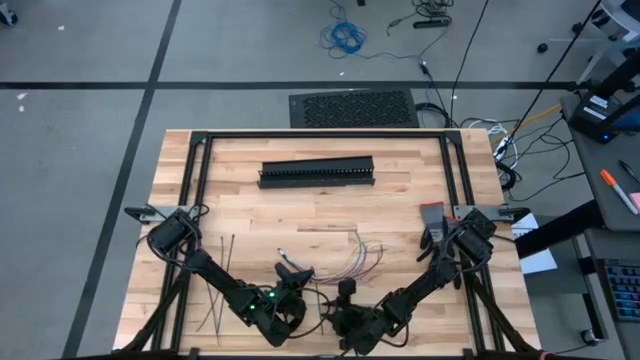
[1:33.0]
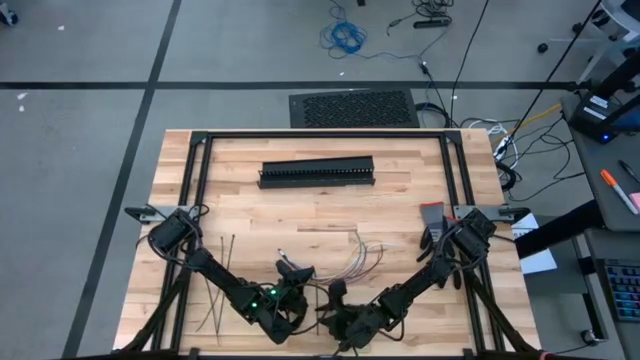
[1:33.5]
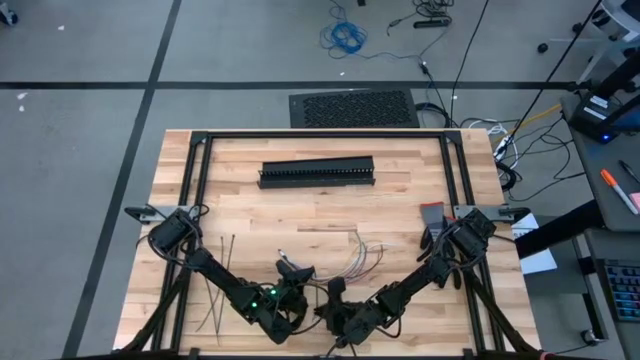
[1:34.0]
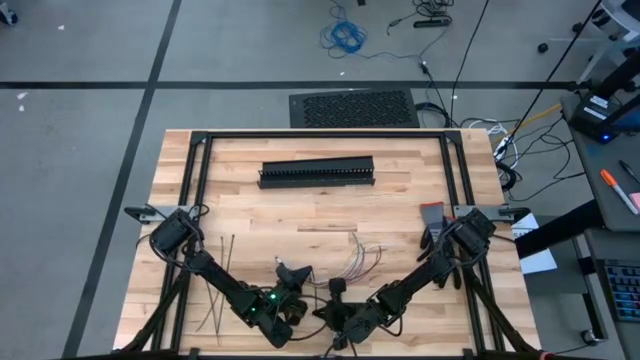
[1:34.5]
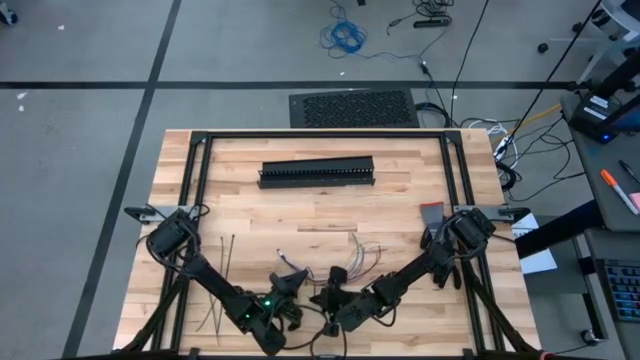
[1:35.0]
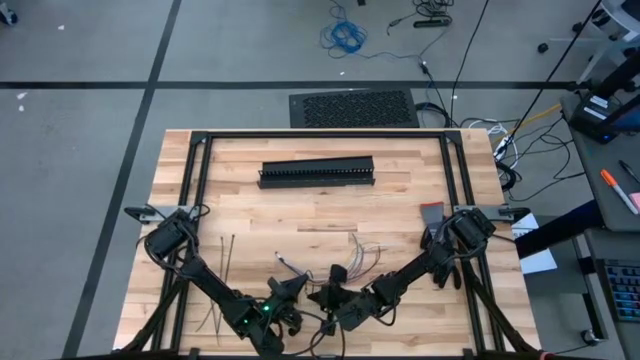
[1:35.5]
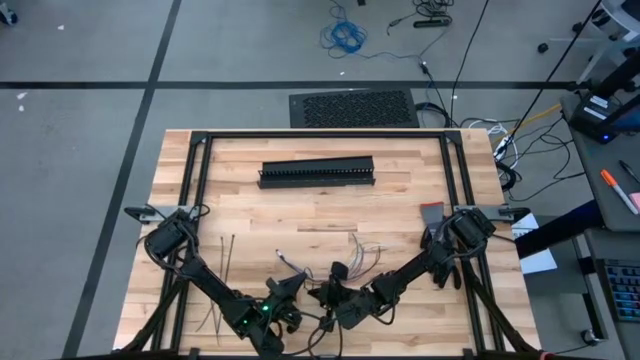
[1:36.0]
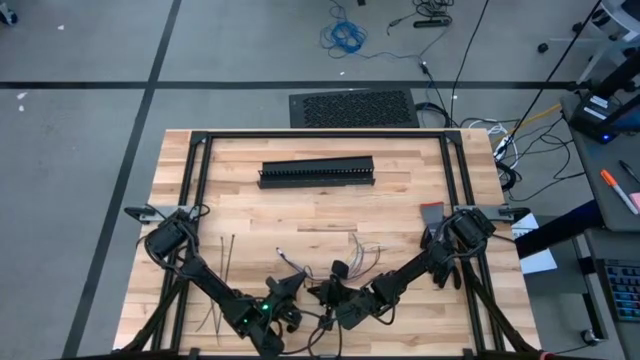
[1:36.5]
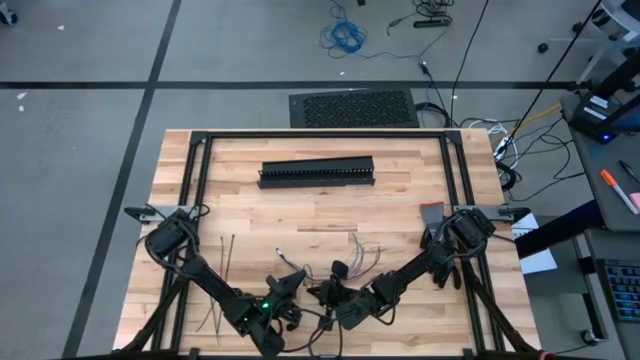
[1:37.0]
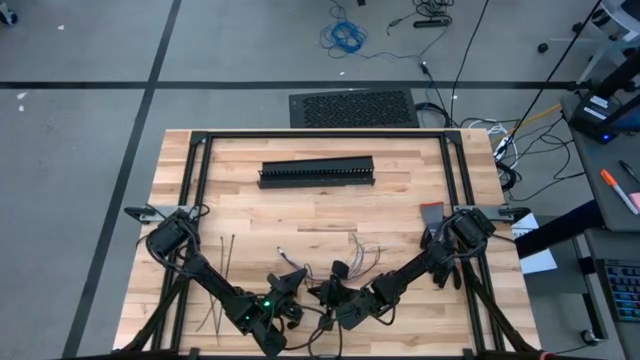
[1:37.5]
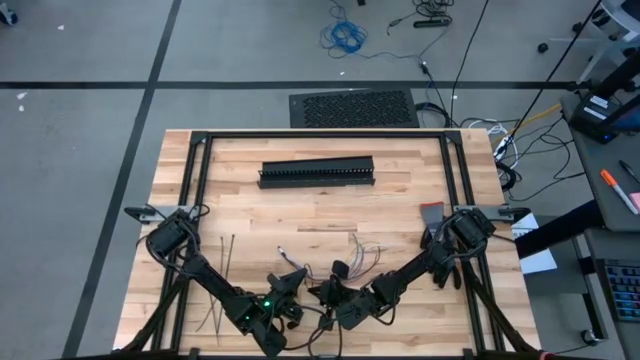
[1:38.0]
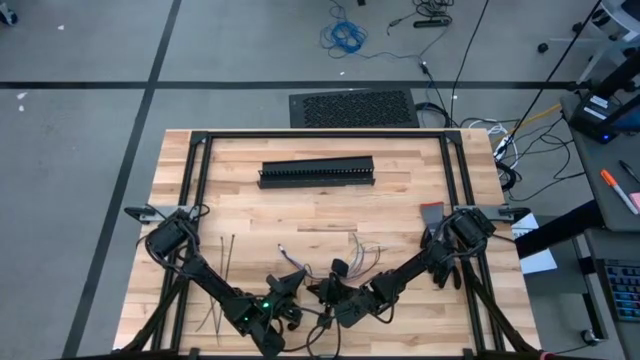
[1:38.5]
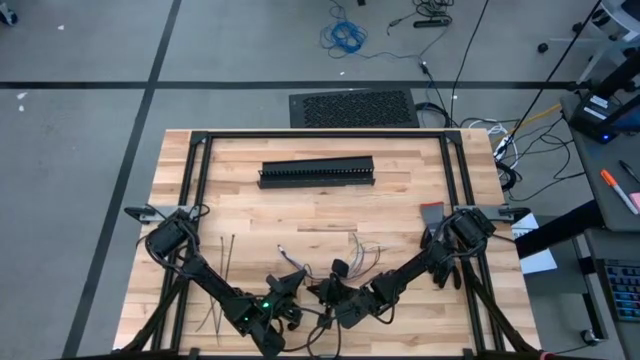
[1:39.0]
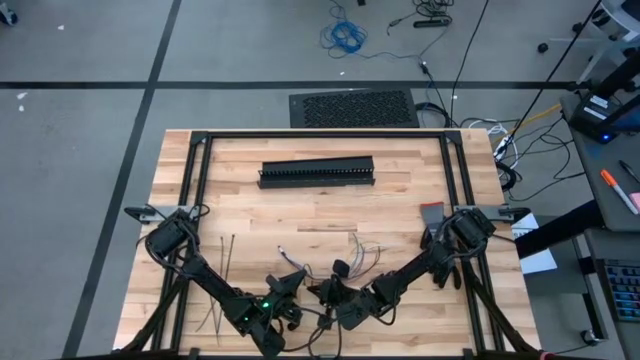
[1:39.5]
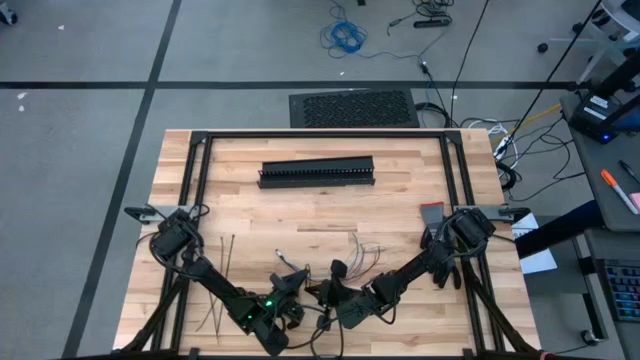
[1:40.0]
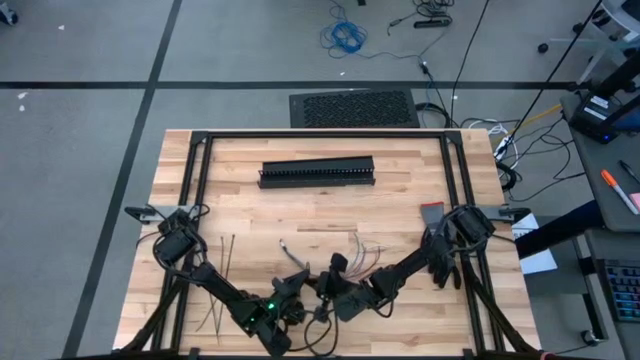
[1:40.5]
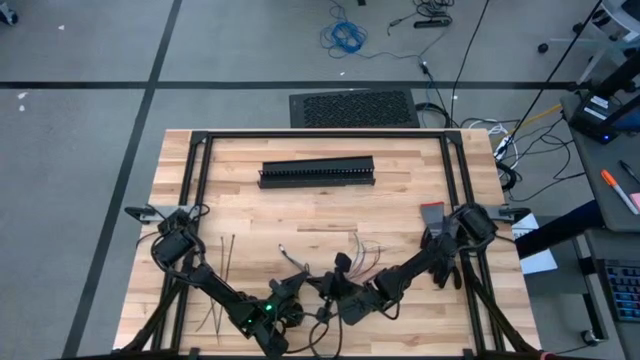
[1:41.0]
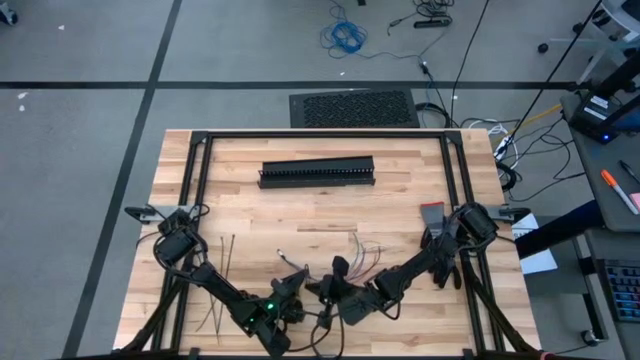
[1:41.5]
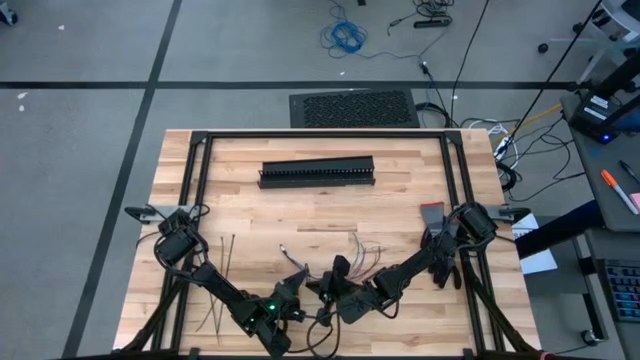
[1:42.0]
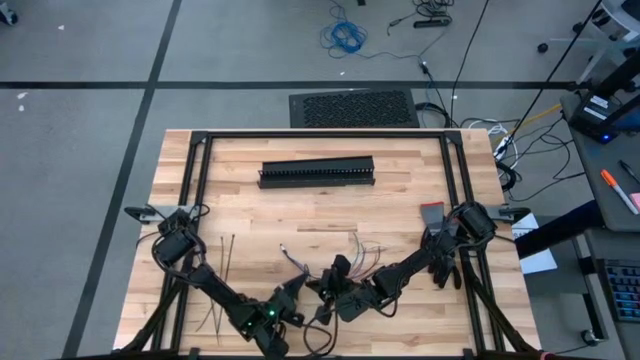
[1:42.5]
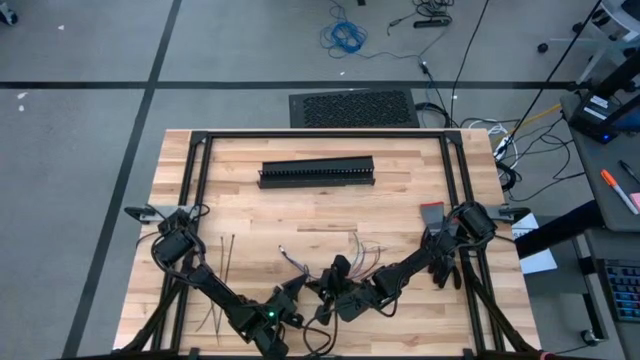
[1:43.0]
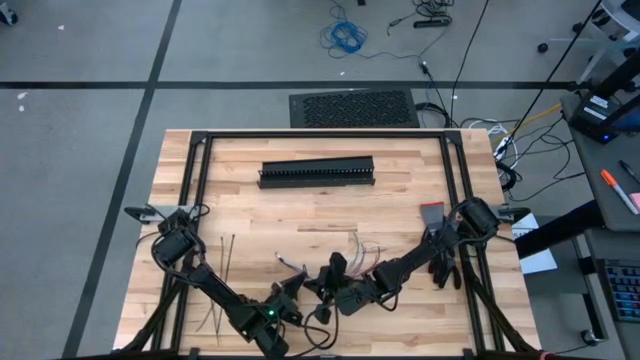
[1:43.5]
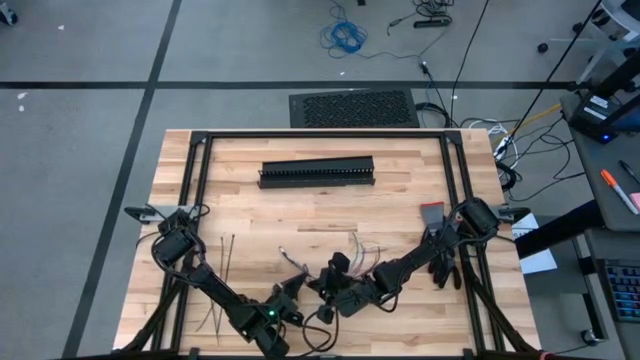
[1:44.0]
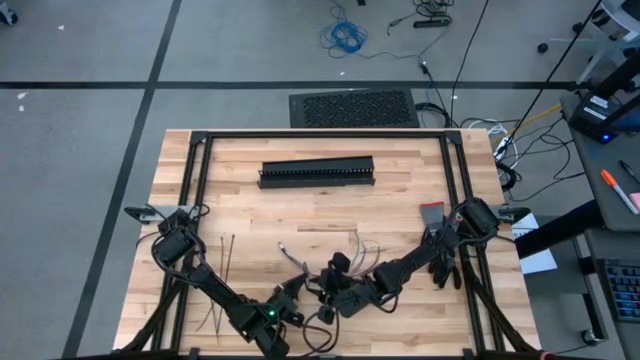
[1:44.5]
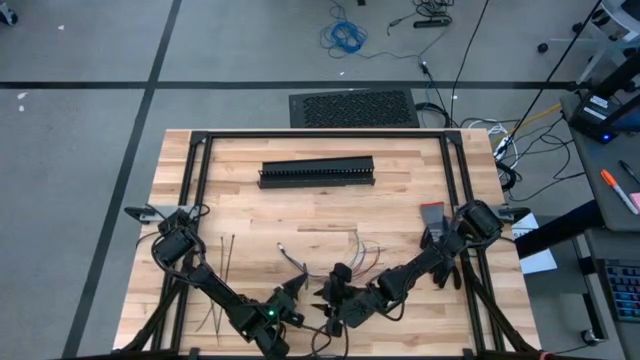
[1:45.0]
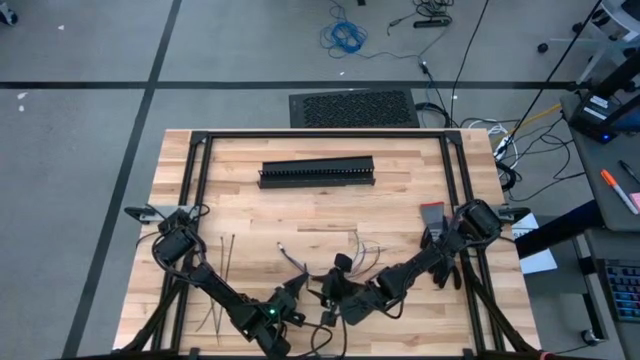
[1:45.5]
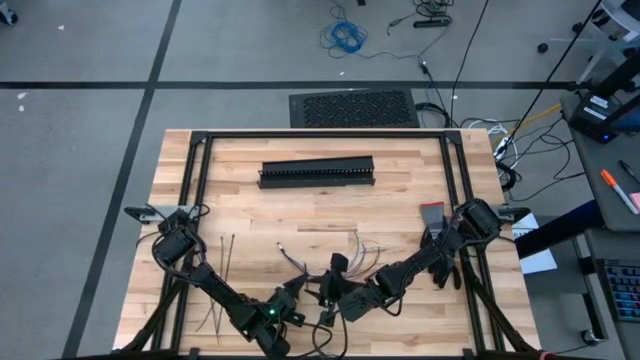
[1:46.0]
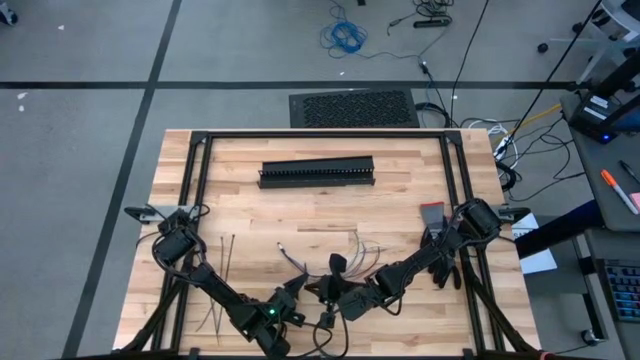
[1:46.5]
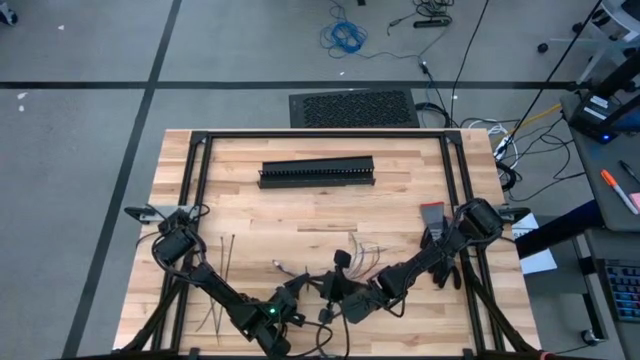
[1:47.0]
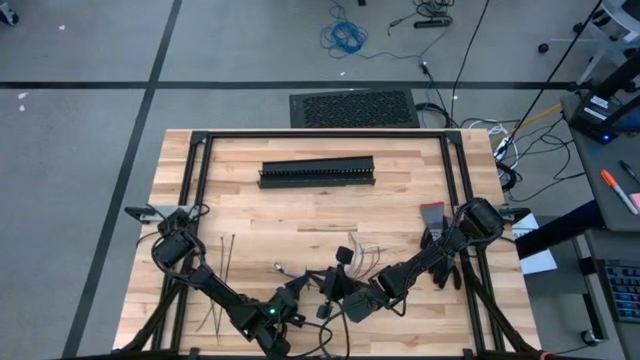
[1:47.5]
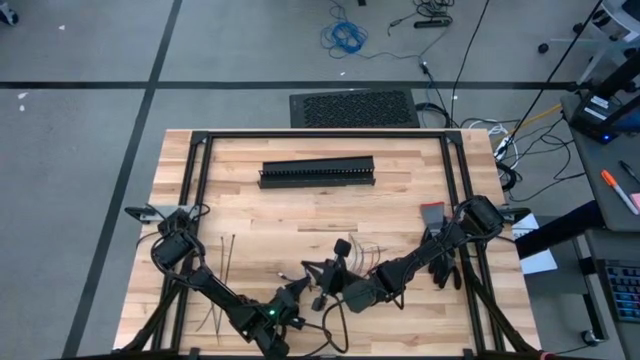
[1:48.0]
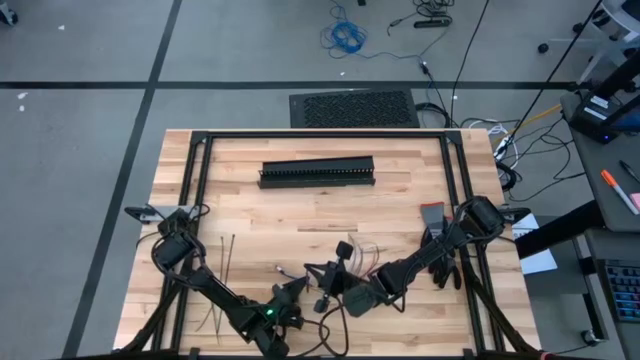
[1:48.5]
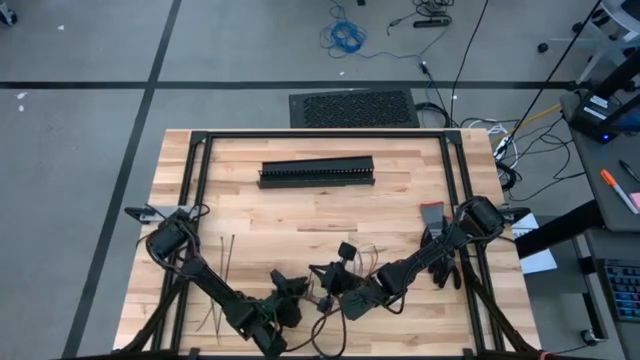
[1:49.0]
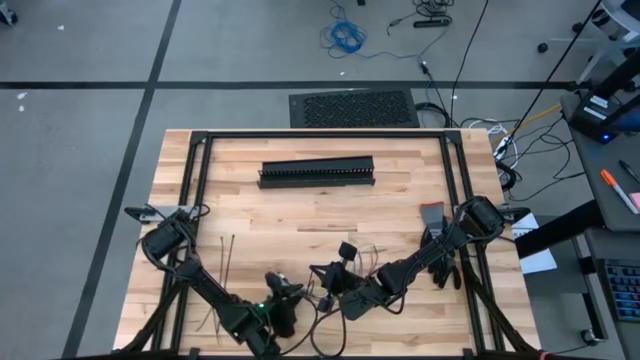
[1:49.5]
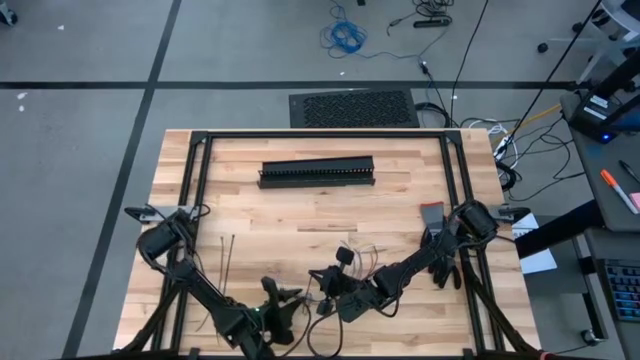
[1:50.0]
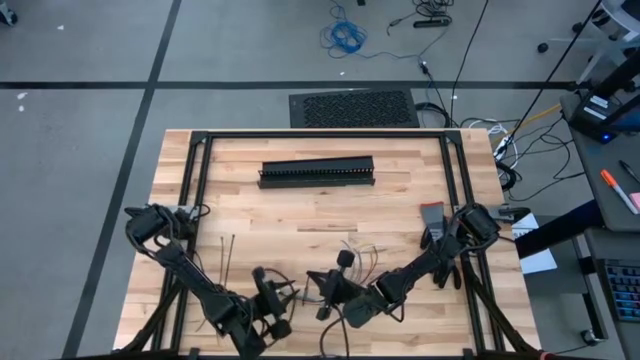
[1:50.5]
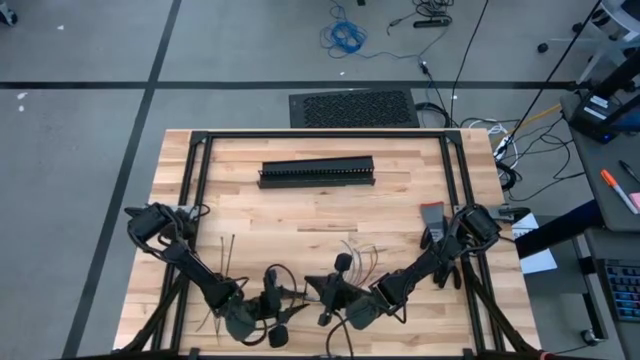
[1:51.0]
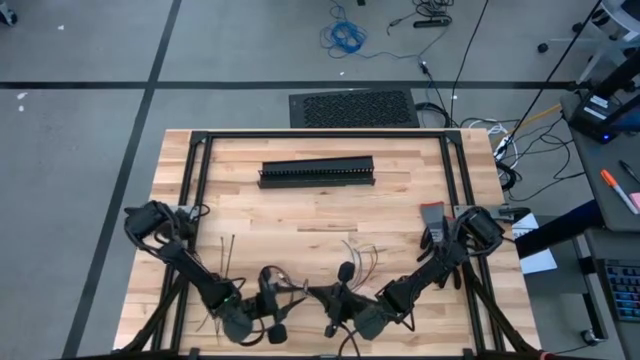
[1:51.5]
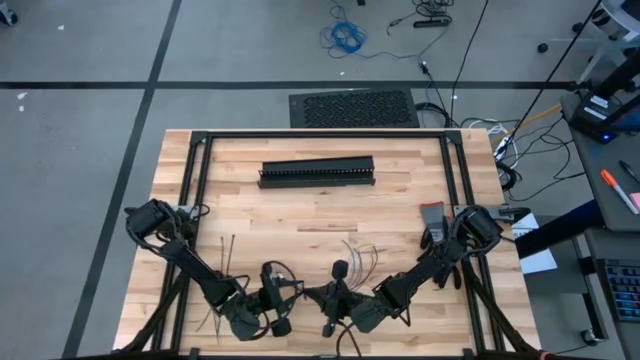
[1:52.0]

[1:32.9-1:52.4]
Task: Ziptie cables
Wrap the zip tie around the cable wires

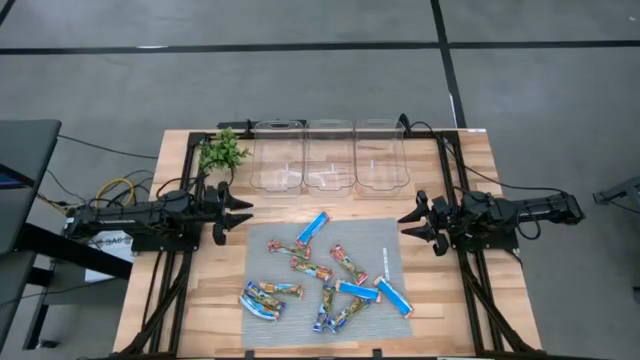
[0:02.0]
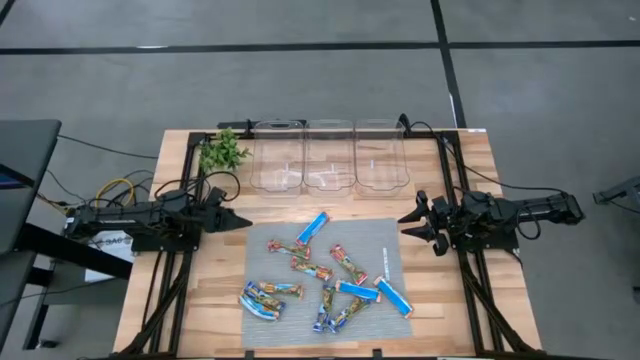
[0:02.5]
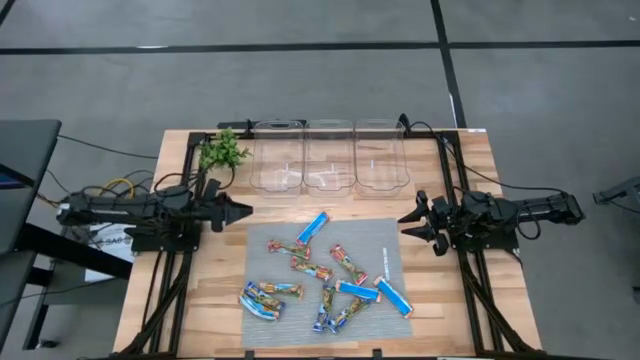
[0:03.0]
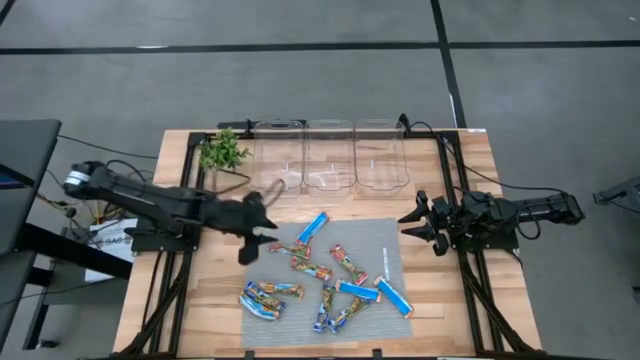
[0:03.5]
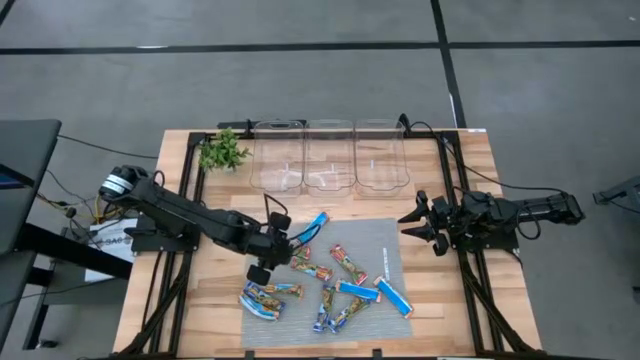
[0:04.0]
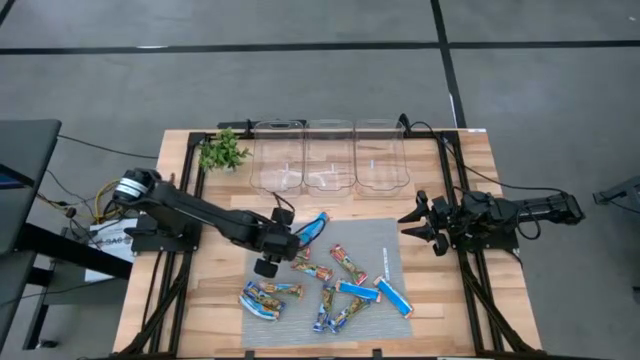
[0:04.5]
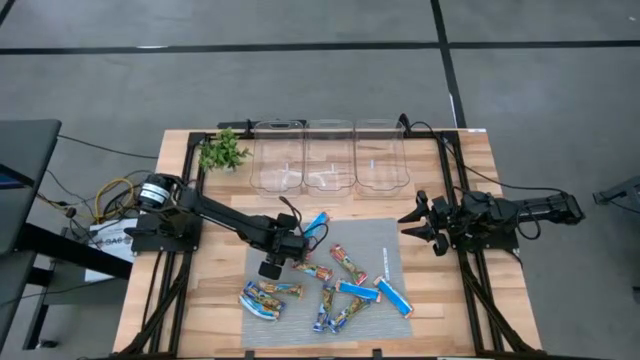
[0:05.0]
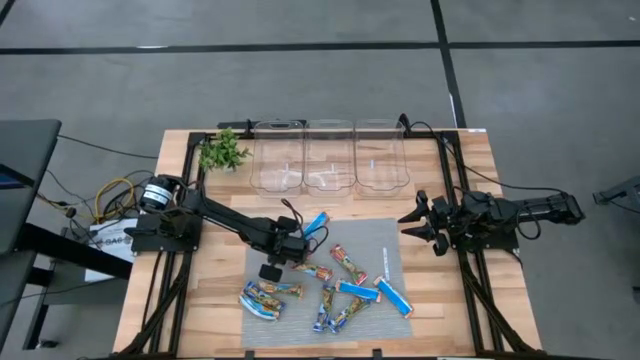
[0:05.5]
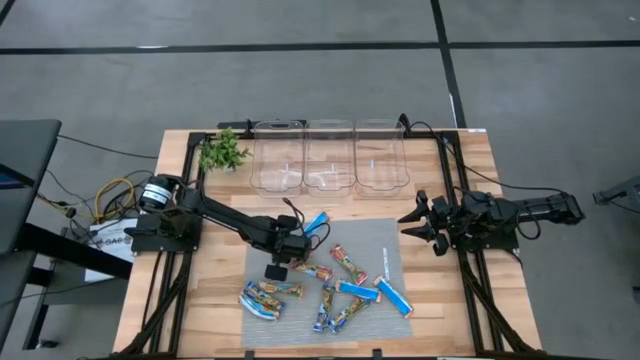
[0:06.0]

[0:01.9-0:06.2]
Task: Pick and place Granola Bars by type
Put the red granola bar into the middle transparent bin
